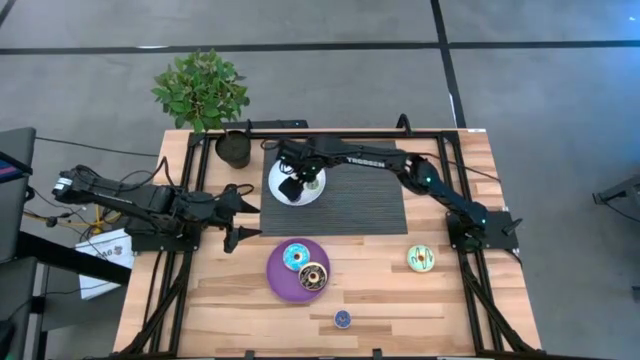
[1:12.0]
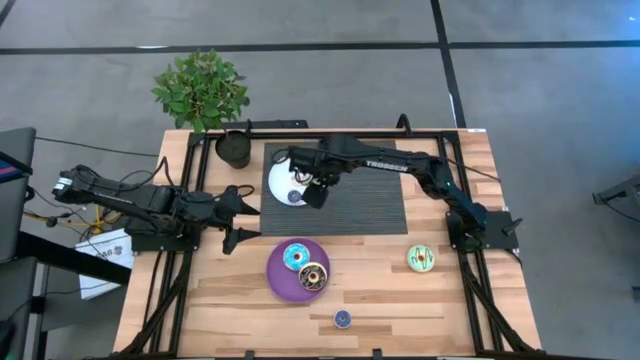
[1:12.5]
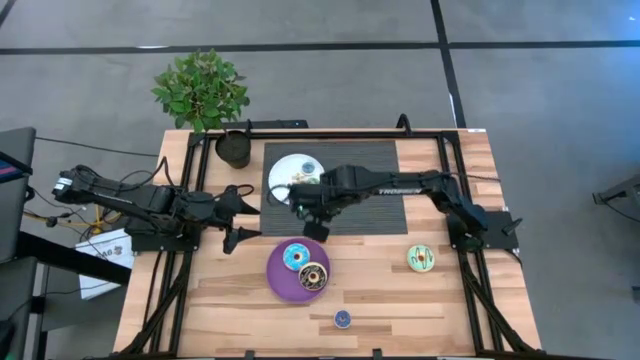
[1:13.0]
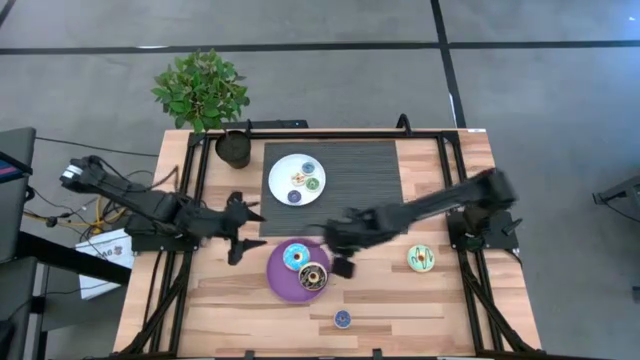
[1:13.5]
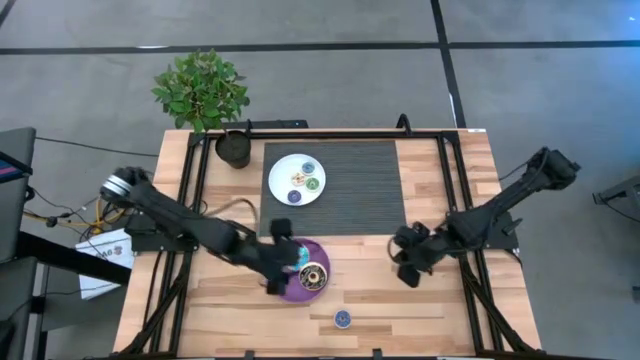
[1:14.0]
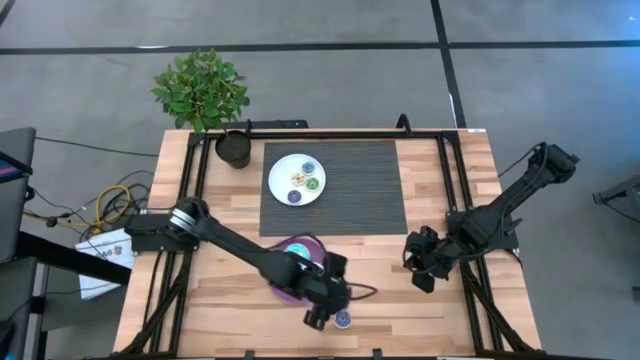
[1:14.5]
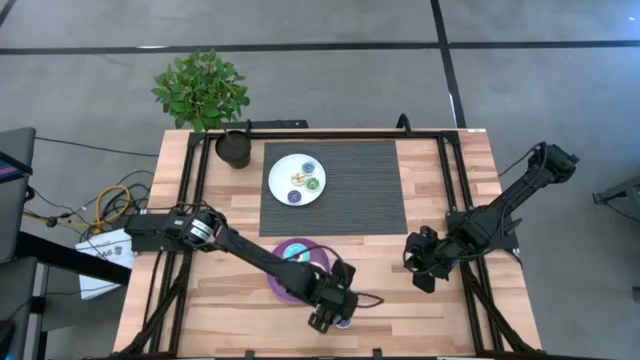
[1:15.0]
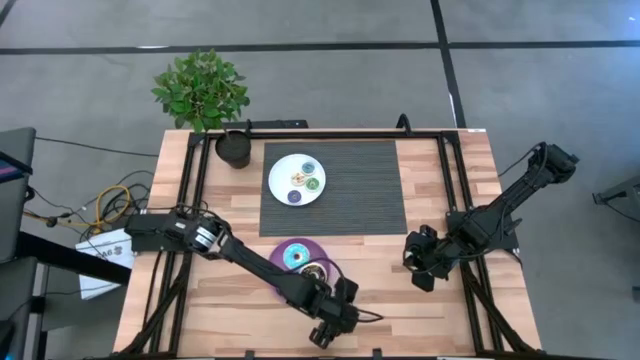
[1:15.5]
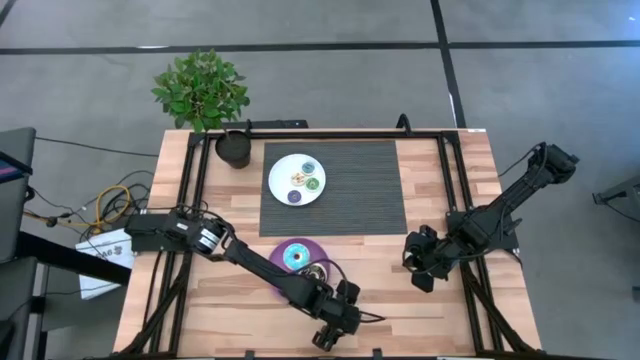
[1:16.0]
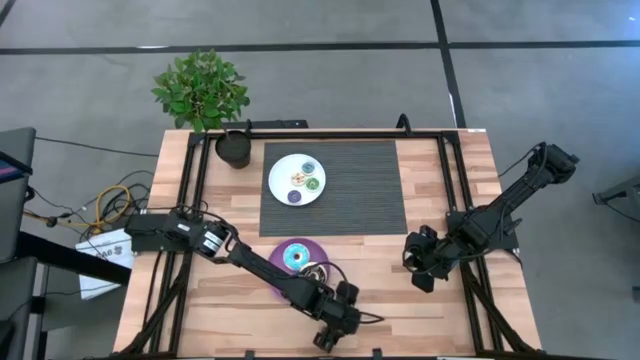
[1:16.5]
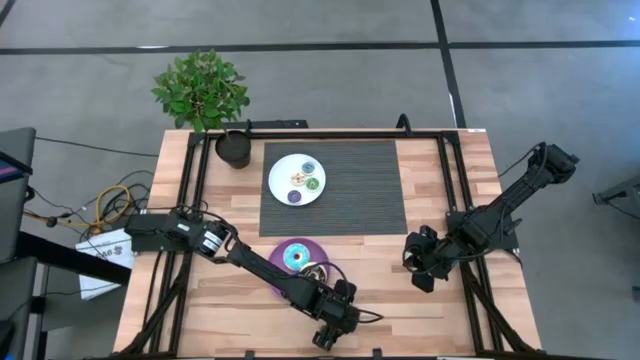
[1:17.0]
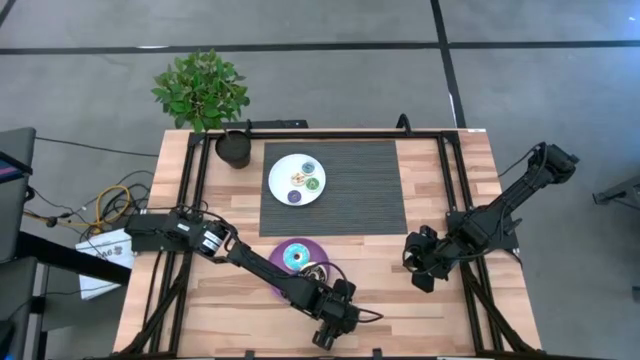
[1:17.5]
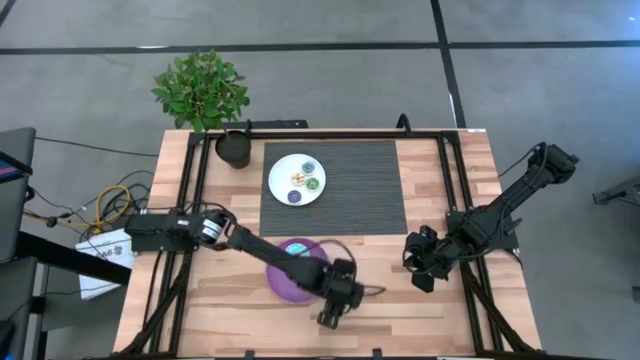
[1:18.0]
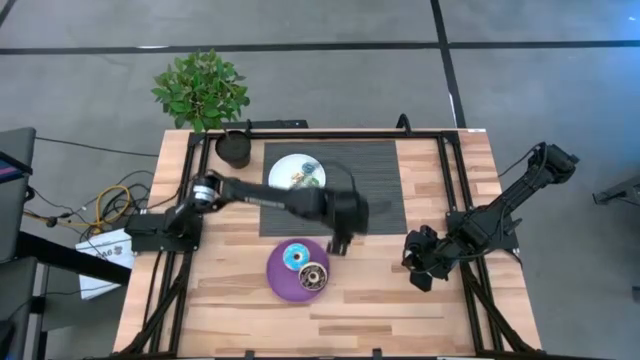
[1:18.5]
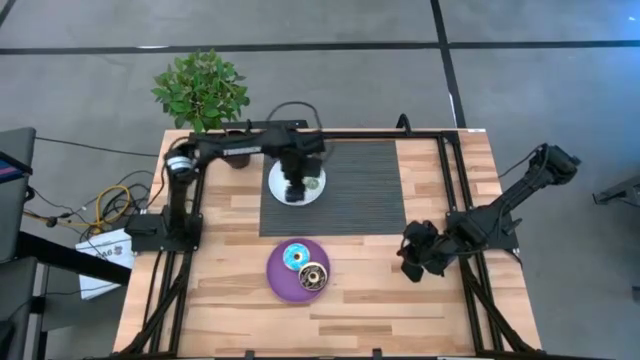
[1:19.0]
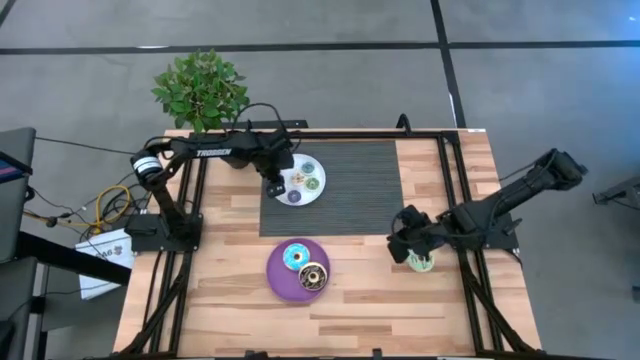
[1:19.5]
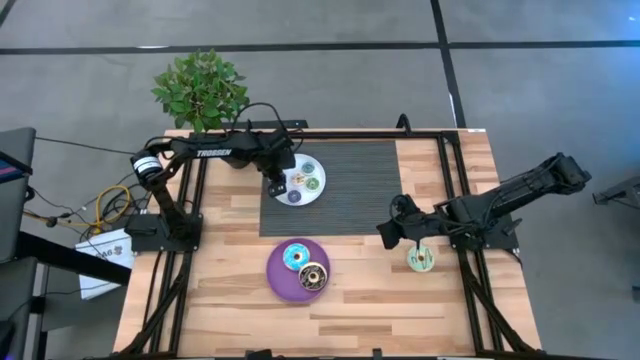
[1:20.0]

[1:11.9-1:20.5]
Task: Pick & Place donuts
Put the small blue donut on the white plate

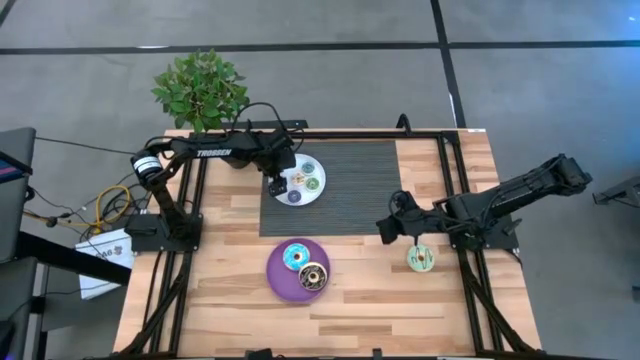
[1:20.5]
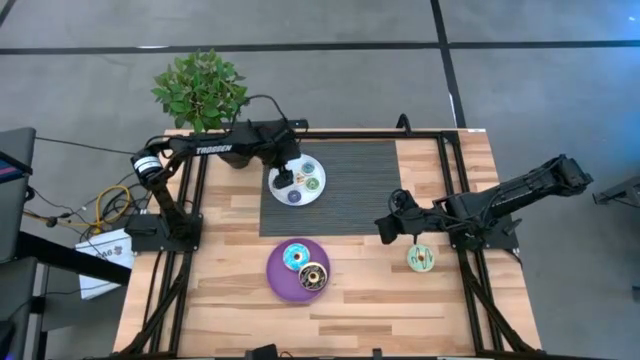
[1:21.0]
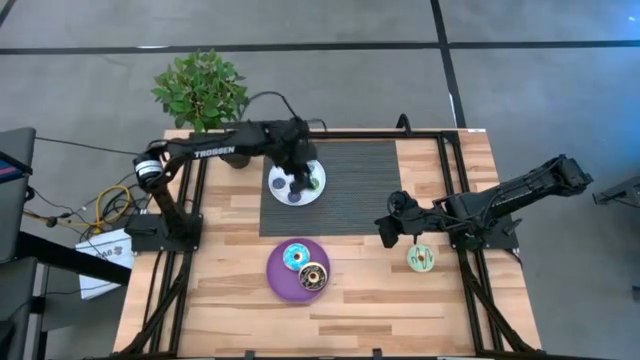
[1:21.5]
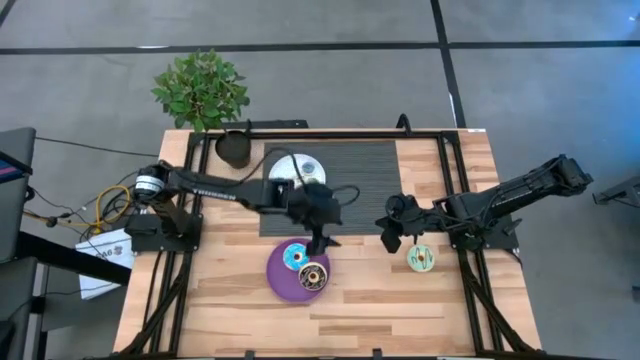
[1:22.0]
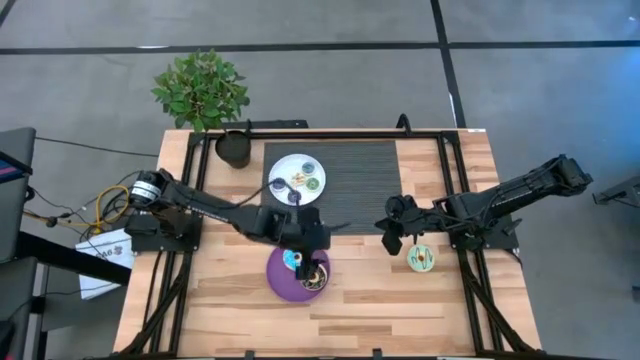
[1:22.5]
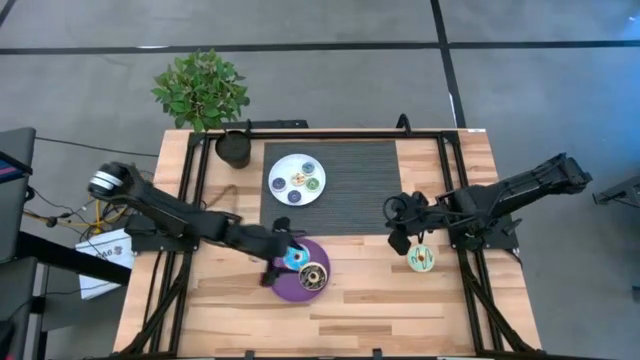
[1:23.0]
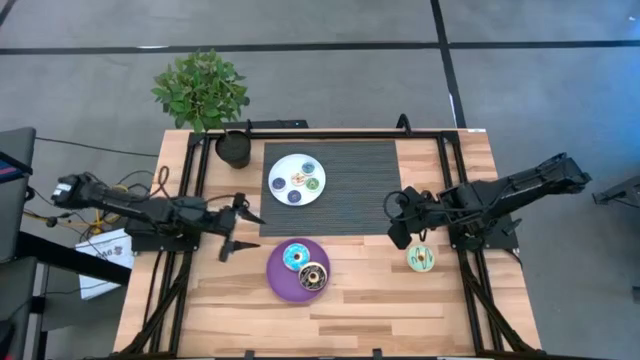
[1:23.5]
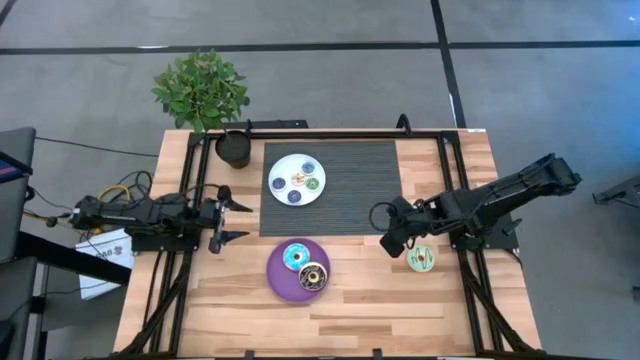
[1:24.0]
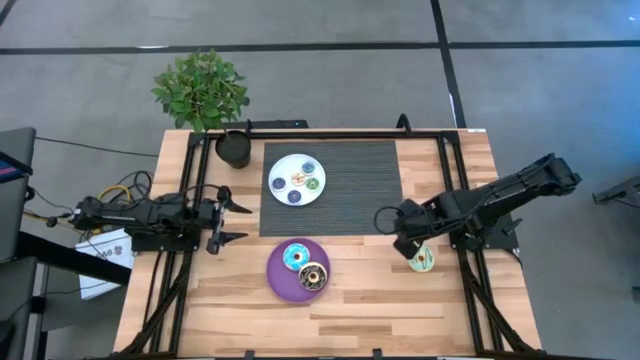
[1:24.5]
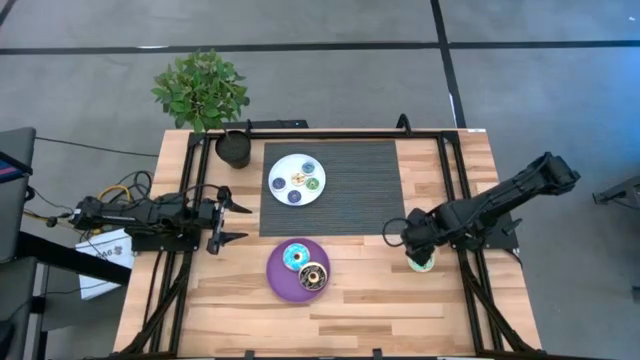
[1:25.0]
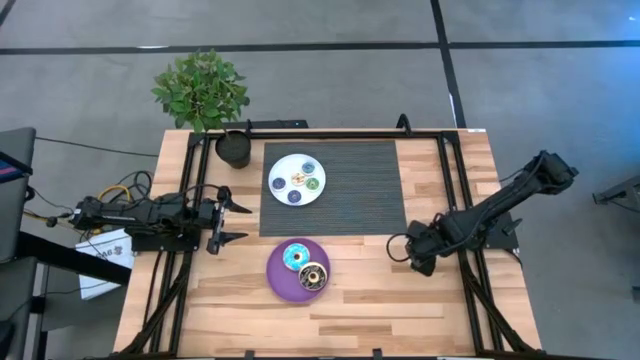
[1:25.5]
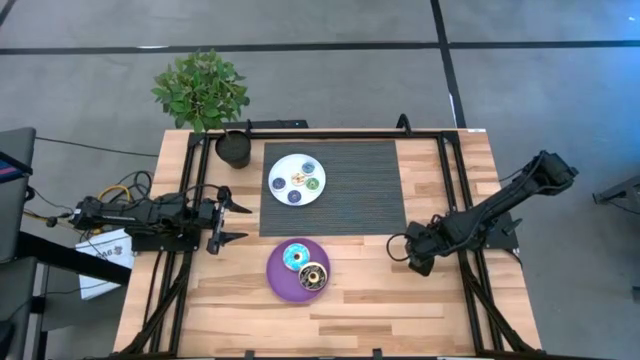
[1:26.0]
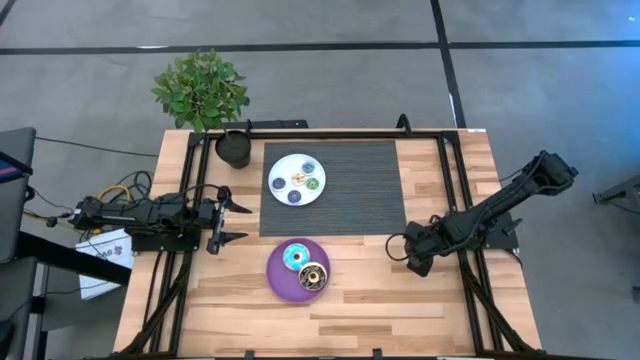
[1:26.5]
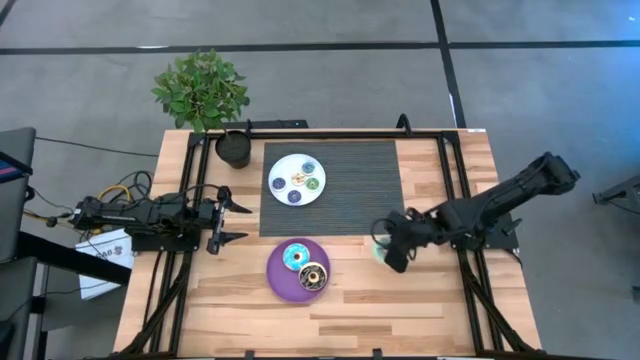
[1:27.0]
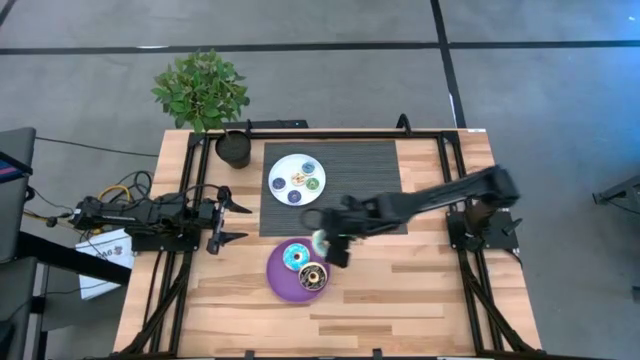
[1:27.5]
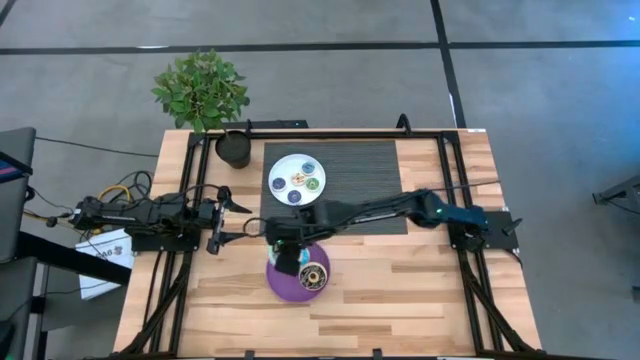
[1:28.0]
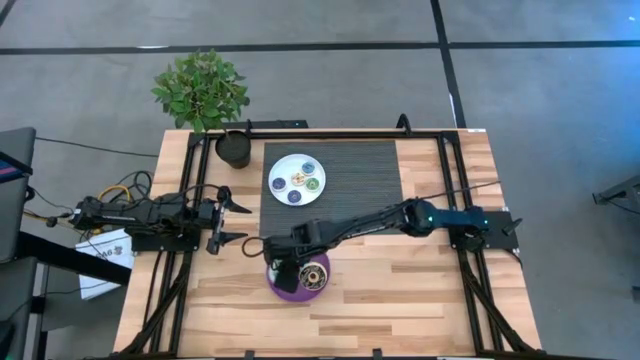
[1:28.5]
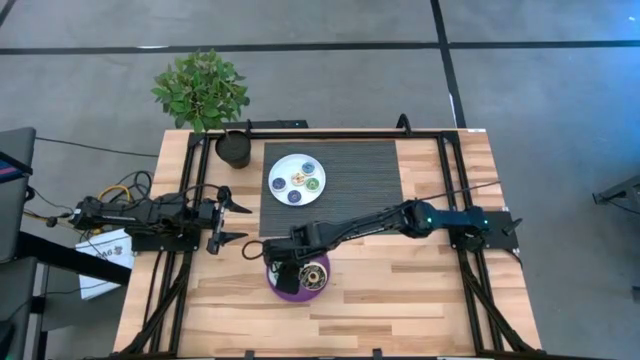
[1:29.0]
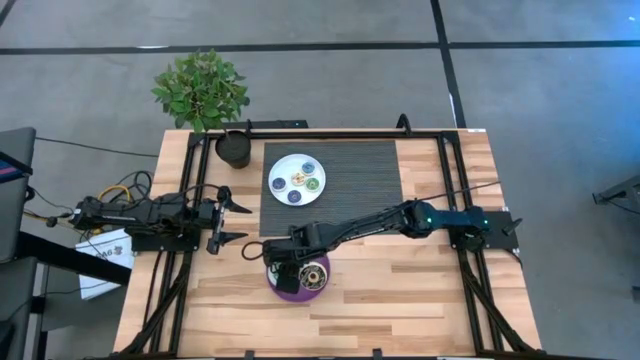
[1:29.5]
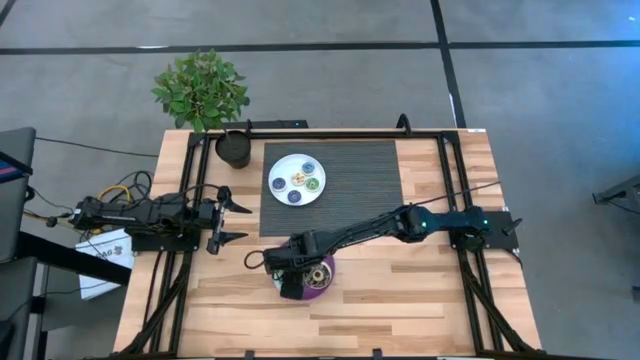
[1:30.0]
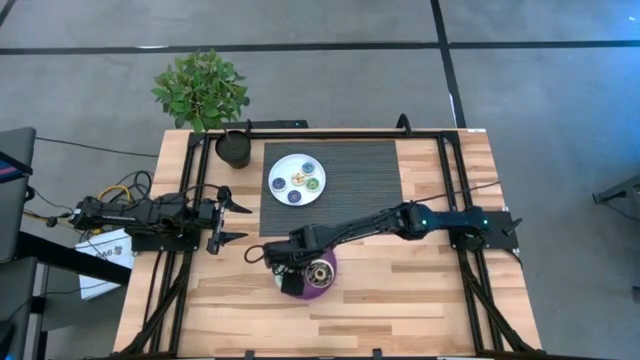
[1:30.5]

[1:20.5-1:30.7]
Put the large light green donut on the purple plate

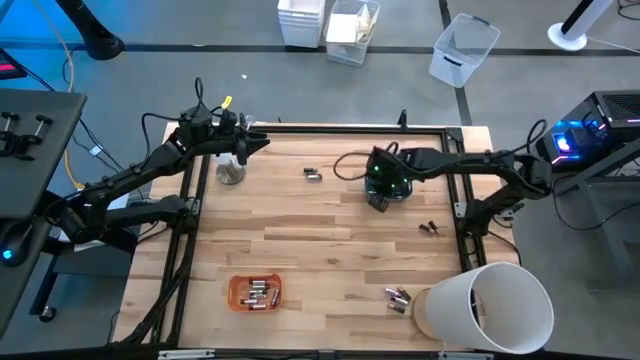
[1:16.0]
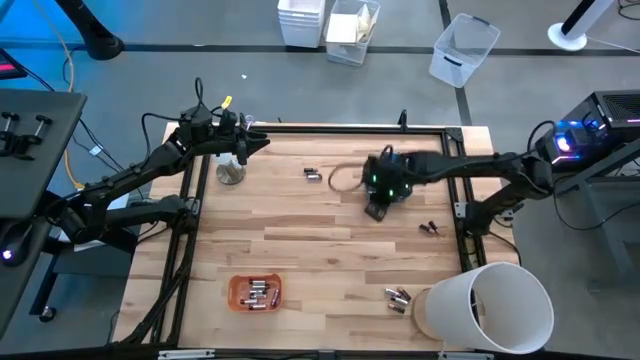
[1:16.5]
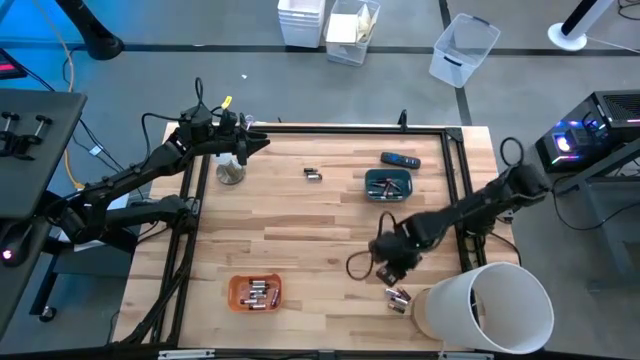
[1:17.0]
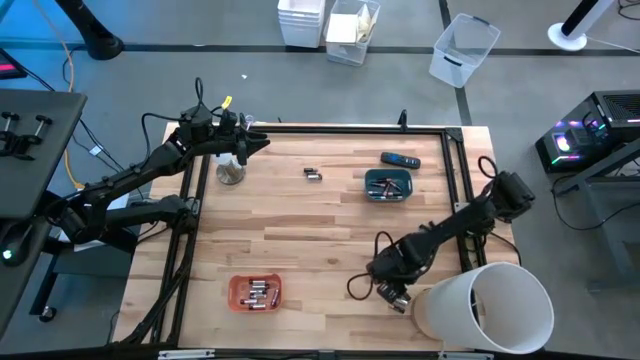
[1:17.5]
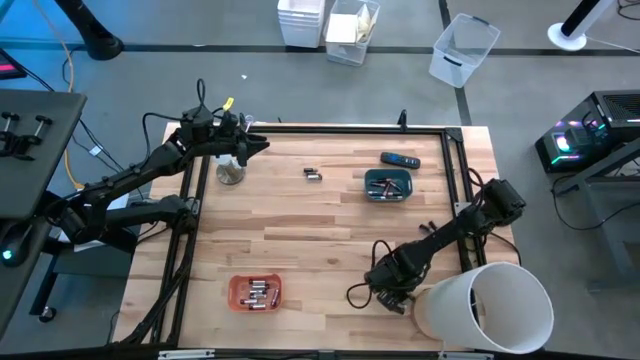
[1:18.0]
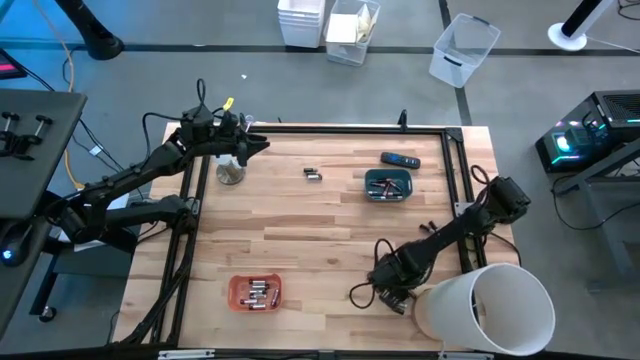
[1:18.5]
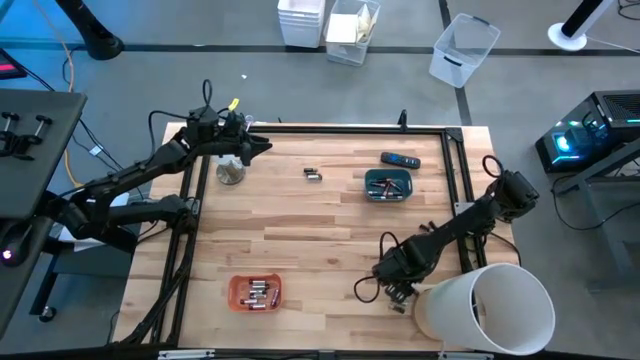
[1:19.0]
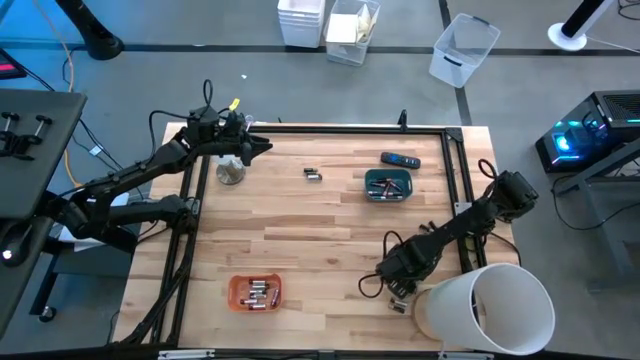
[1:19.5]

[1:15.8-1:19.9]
Task: Sort batteries
Put the black battery into the blue bin
